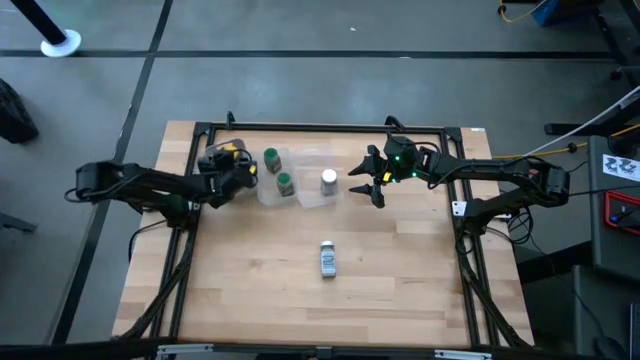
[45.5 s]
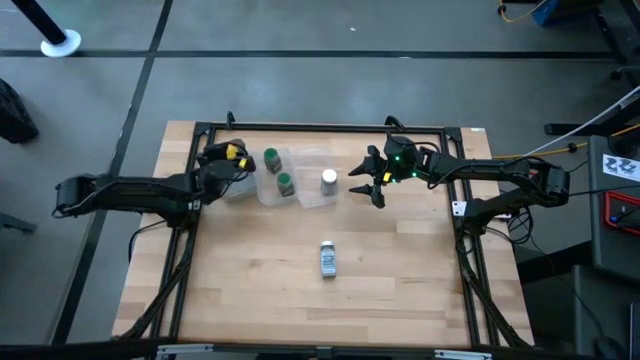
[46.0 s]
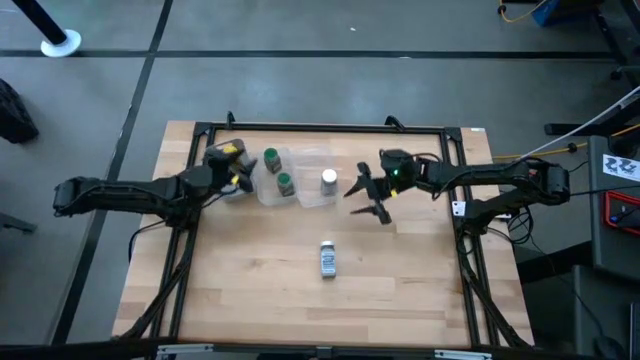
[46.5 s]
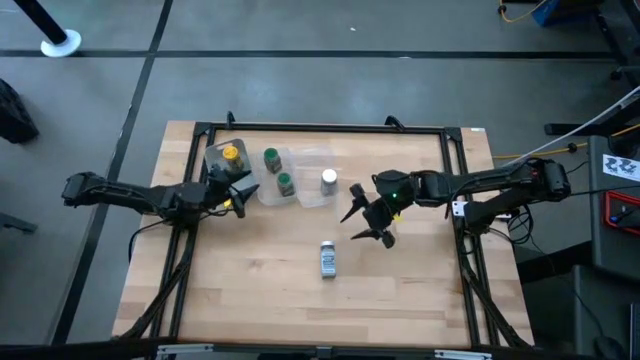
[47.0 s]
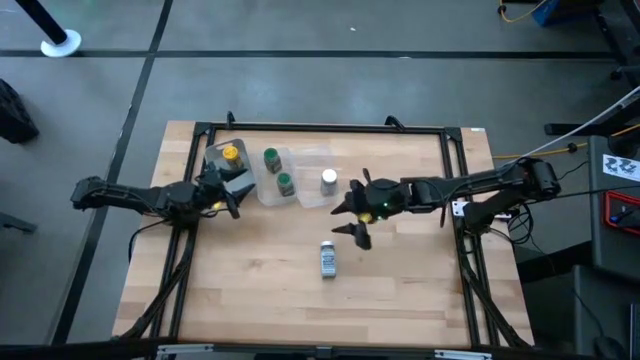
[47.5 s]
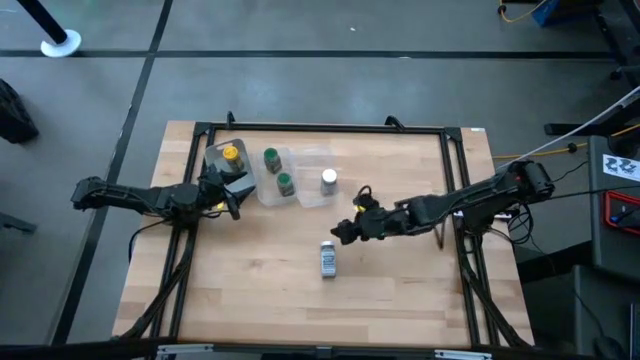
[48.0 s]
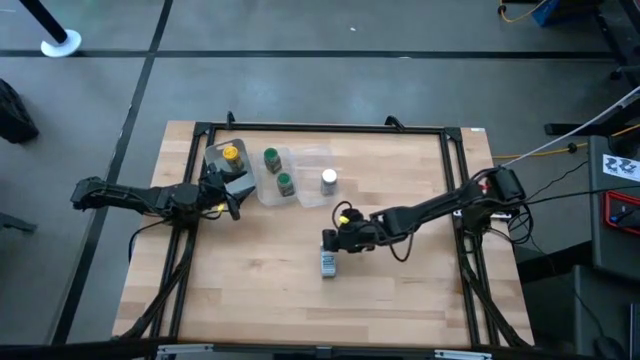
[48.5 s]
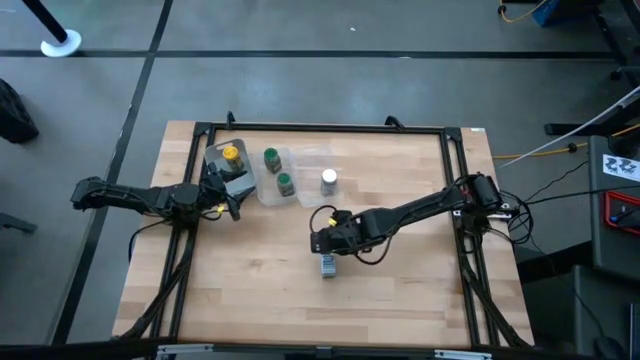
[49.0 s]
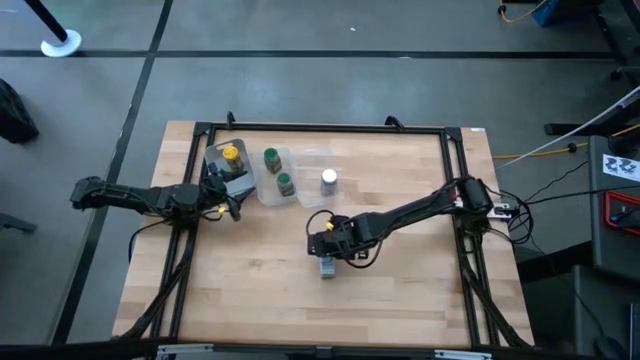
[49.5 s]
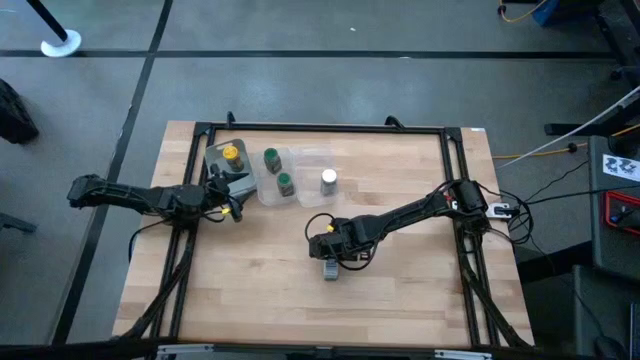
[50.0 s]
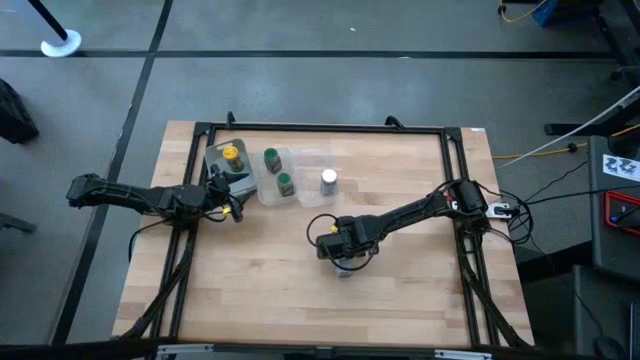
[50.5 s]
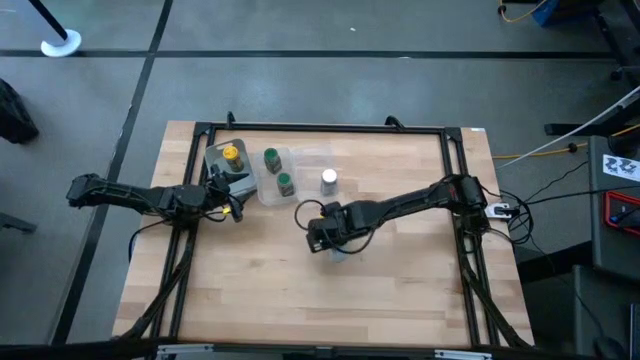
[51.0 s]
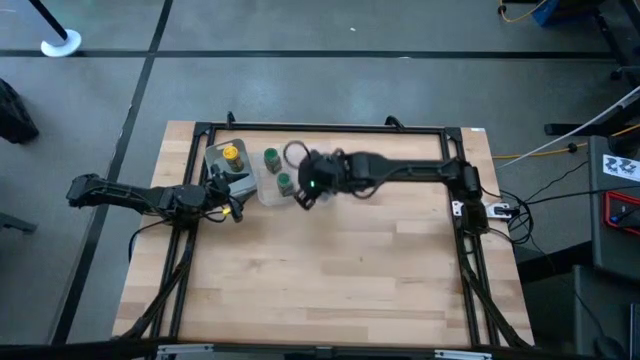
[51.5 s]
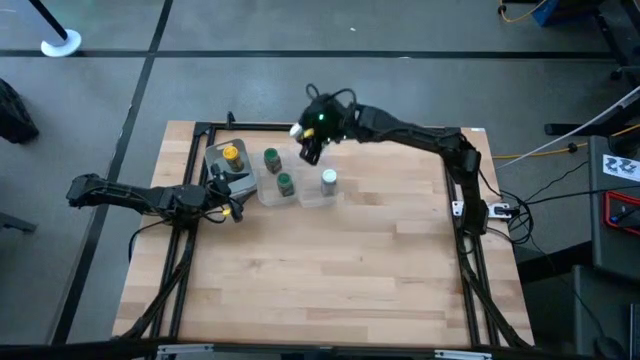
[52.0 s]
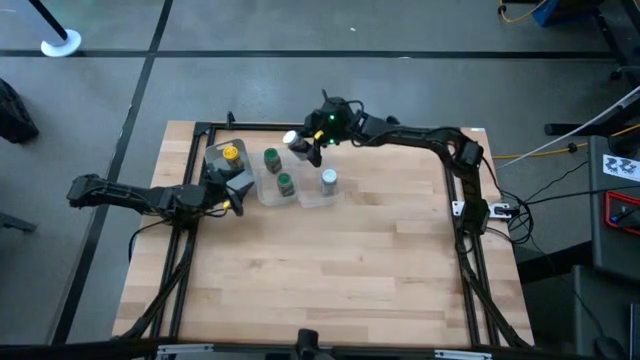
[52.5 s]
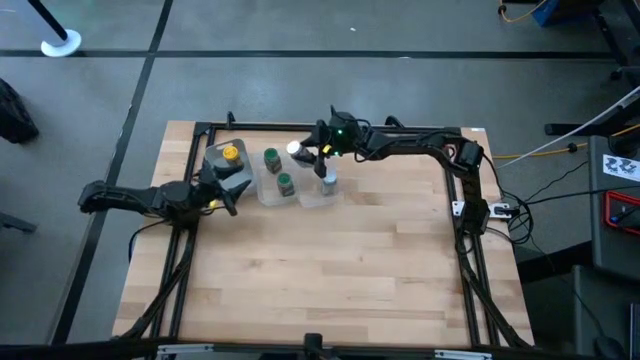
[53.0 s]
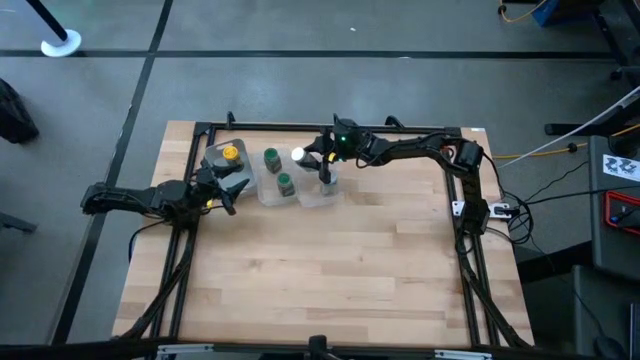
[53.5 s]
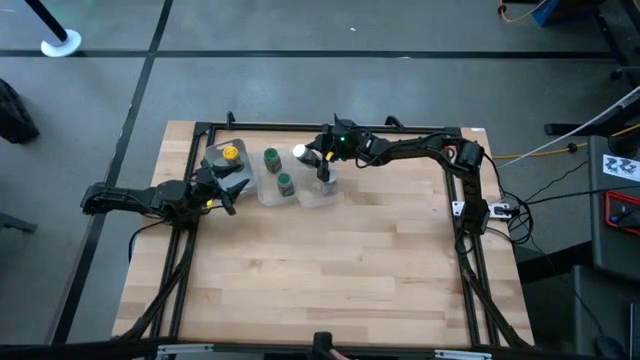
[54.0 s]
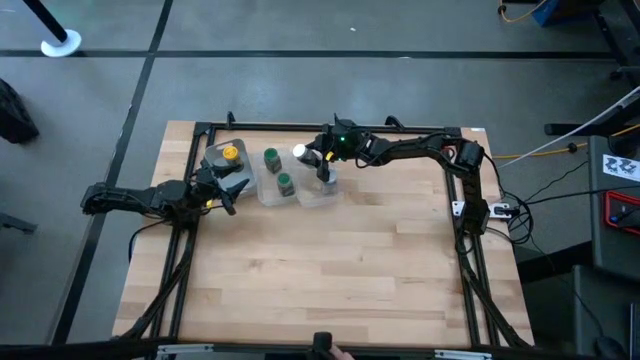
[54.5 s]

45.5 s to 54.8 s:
Task: Sort spices by type
Put the white seasoning bottle into the right transparent bin

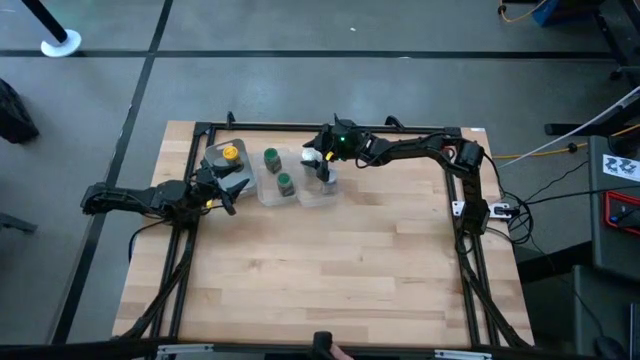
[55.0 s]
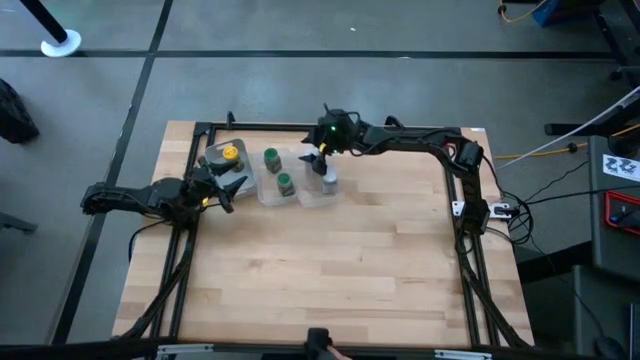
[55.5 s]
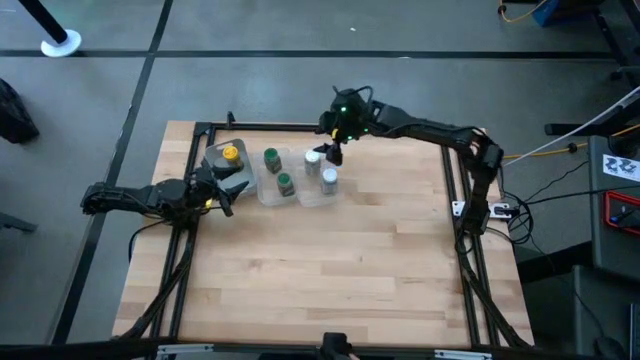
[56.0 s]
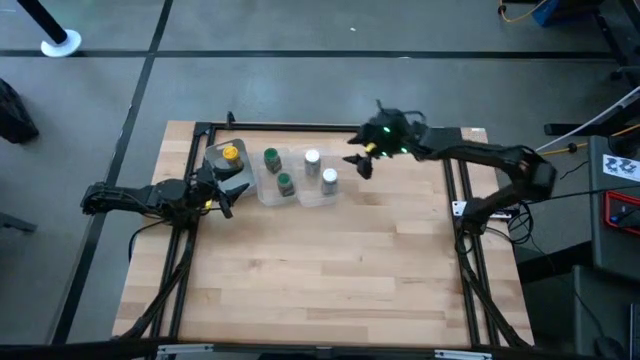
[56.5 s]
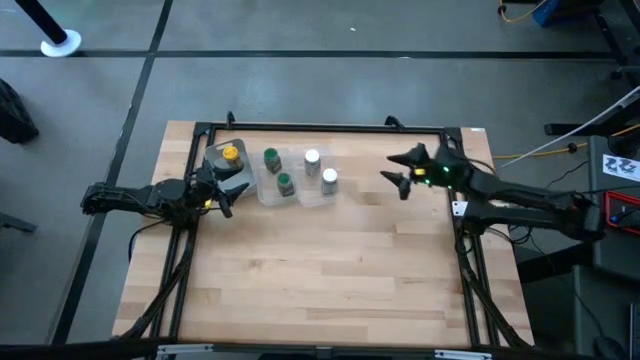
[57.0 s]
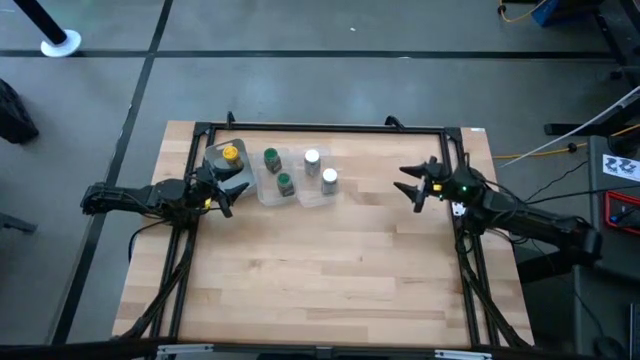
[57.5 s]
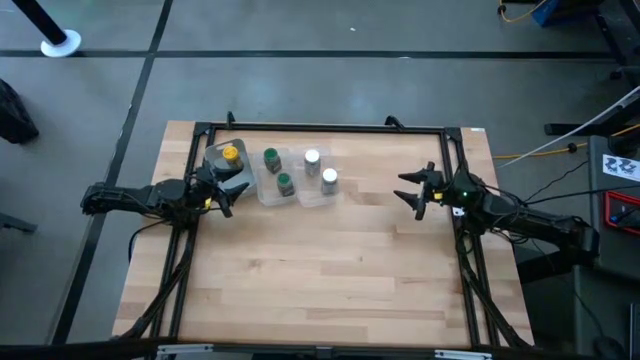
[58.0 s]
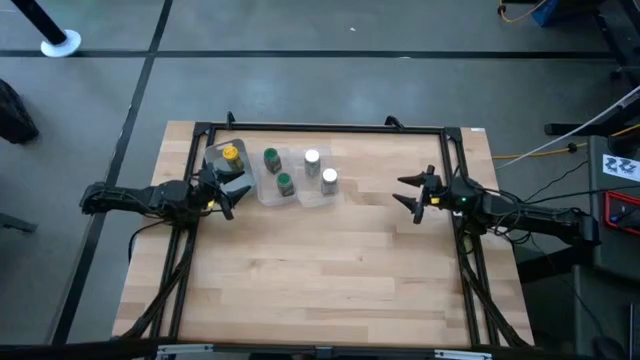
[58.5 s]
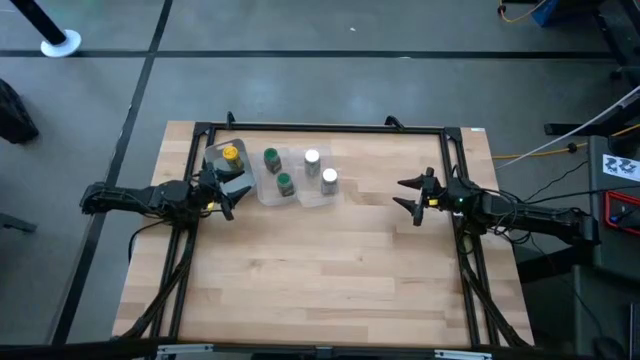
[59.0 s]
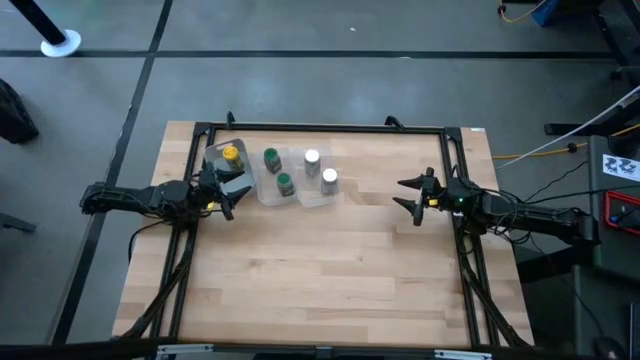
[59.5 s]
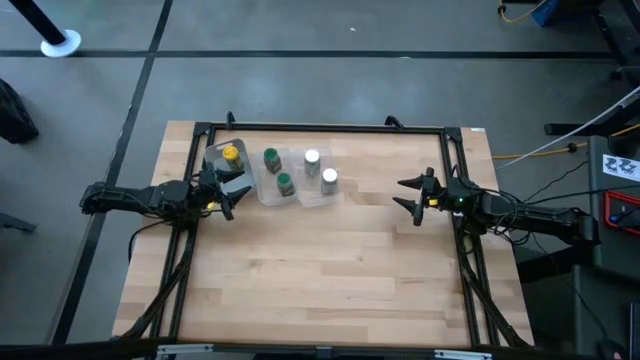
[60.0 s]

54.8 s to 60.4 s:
Return to Home Position

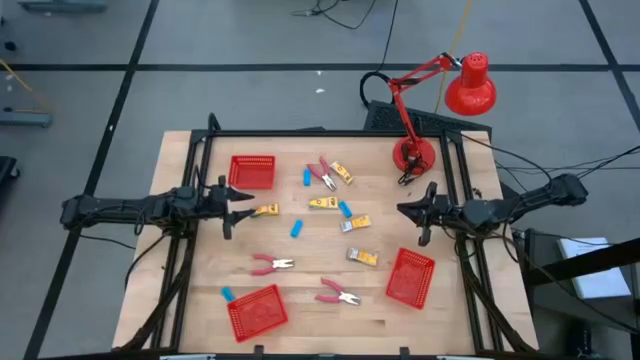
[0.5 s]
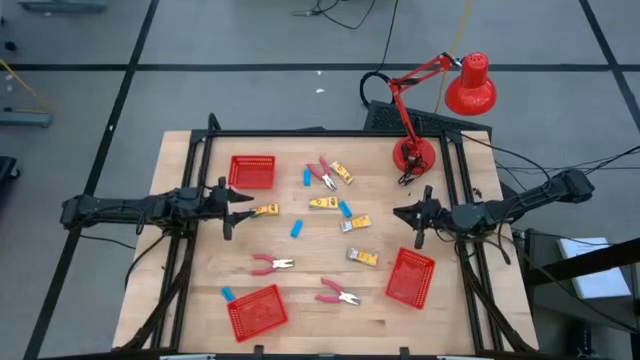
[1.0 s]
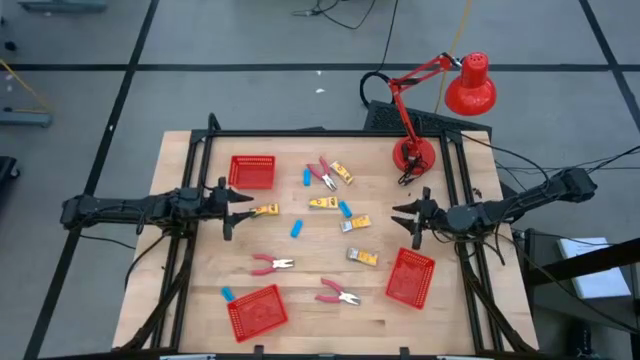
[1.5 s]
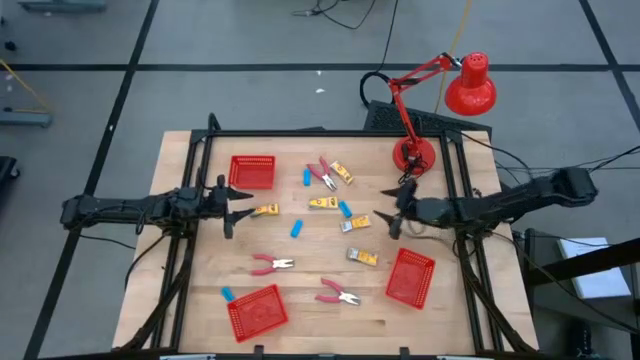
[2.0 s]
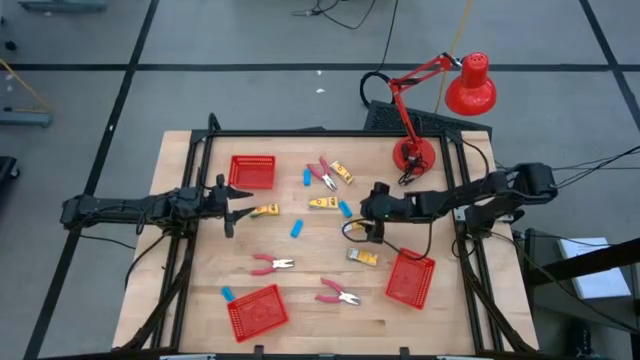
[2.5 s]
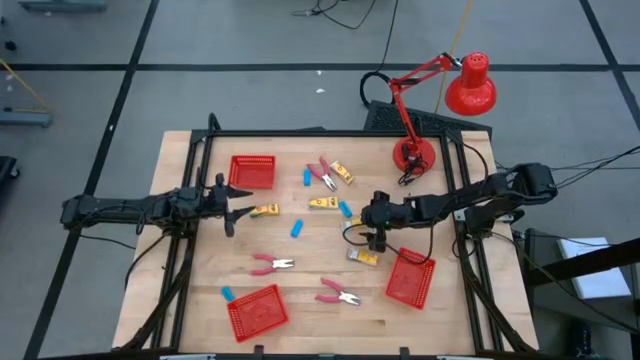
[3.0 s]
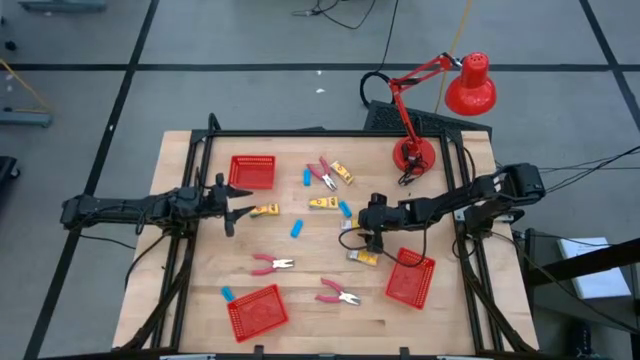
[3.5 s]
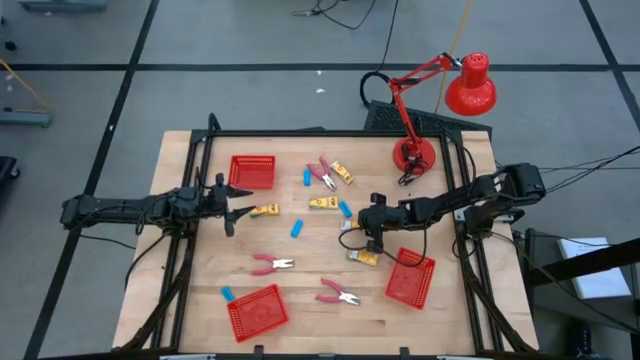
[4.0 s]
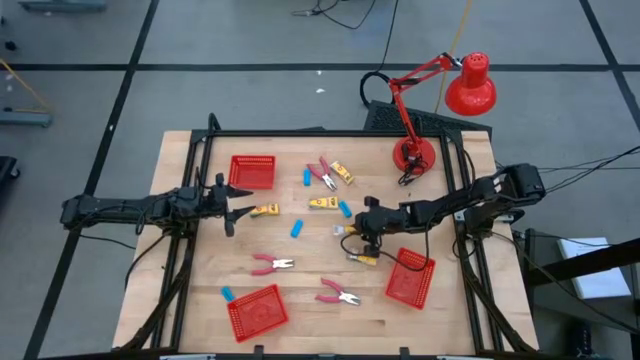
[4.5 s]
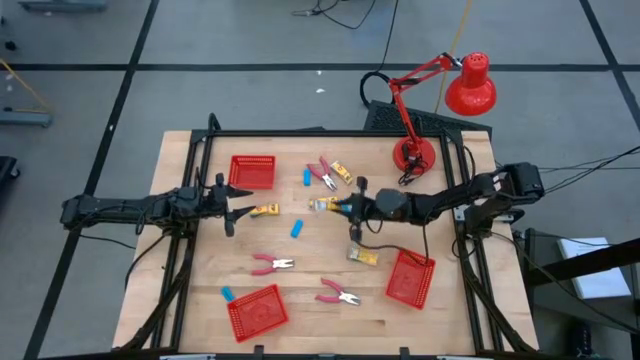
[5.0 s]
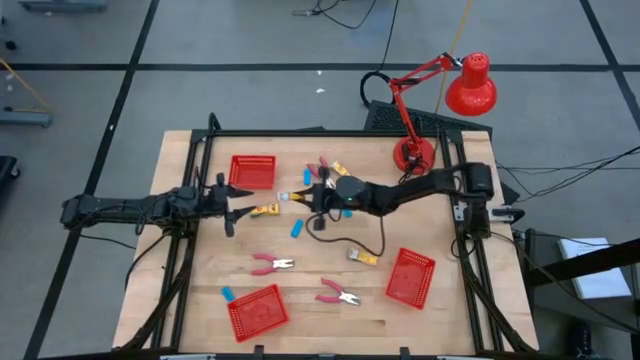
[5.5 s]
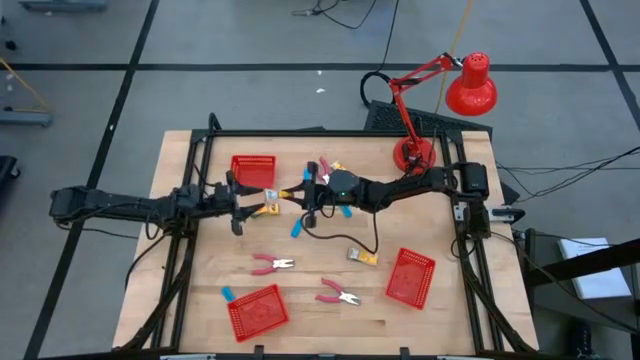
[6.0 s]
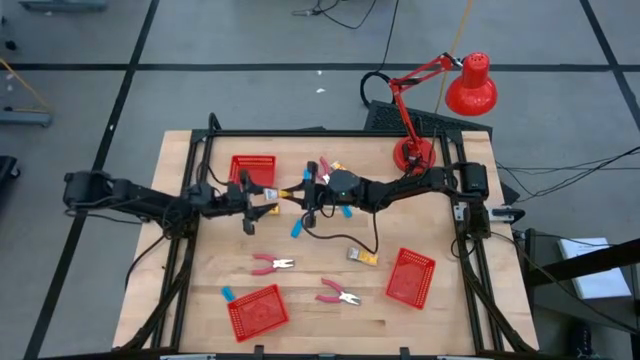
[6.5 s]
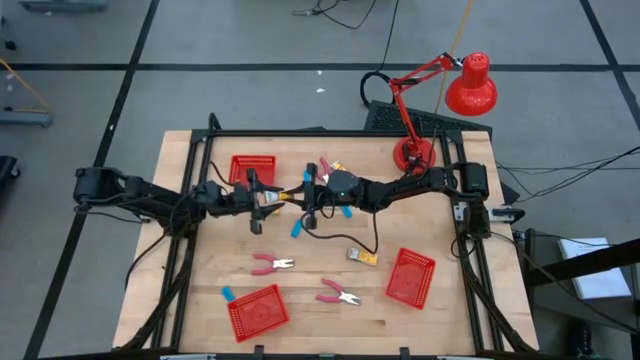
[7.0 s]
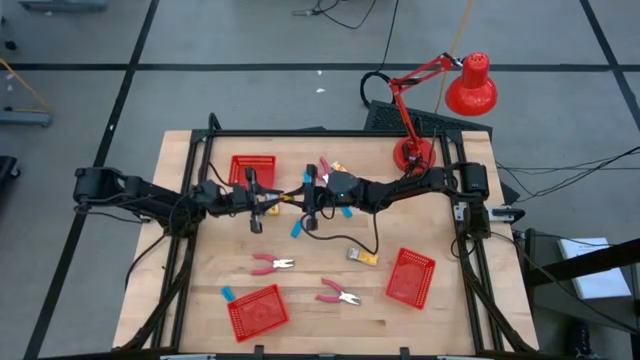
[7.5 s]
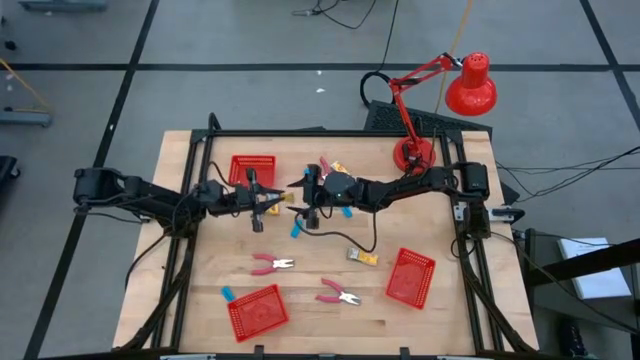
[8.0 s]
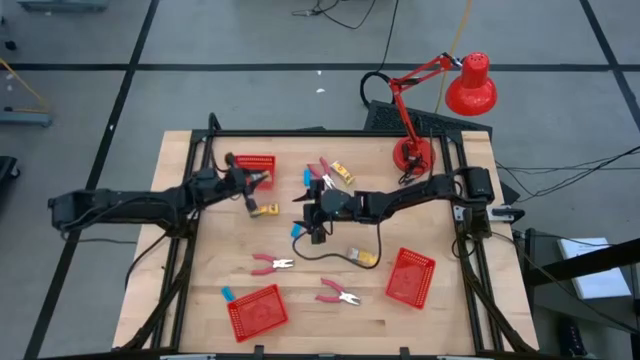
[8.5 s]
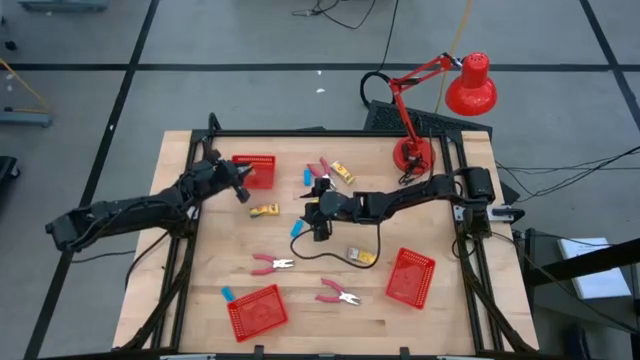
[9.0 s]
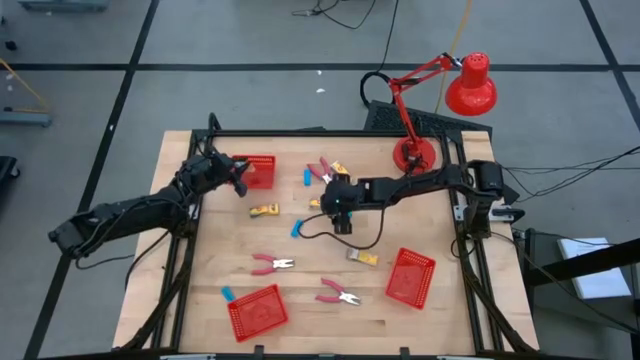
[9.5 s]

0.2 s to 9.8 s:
Task: Pick & Place School Supplies
Put the yellow crayon box into the top red basket
